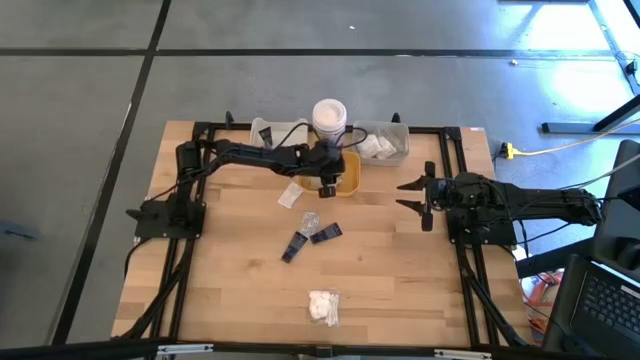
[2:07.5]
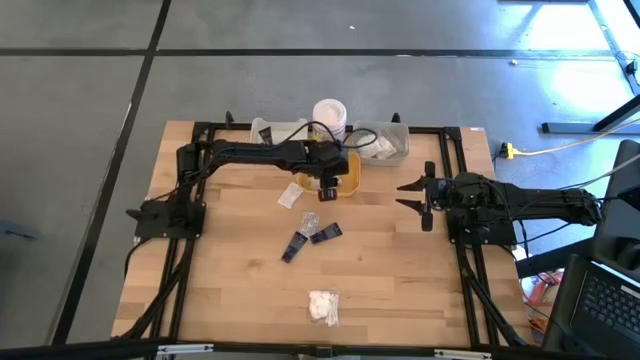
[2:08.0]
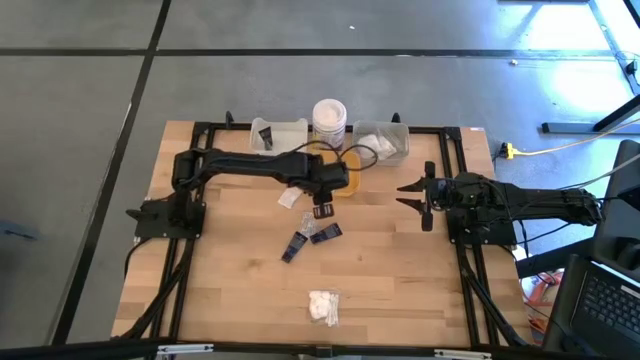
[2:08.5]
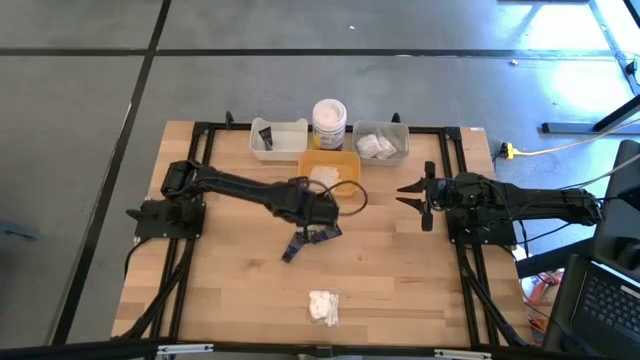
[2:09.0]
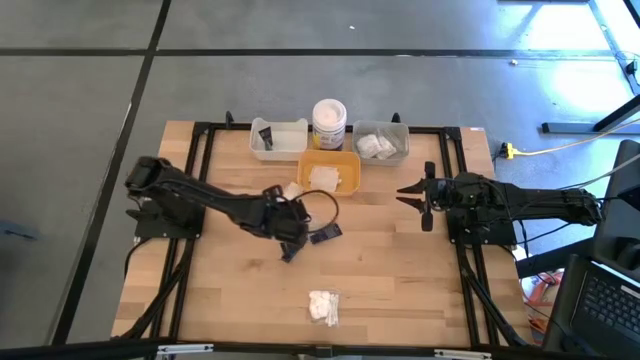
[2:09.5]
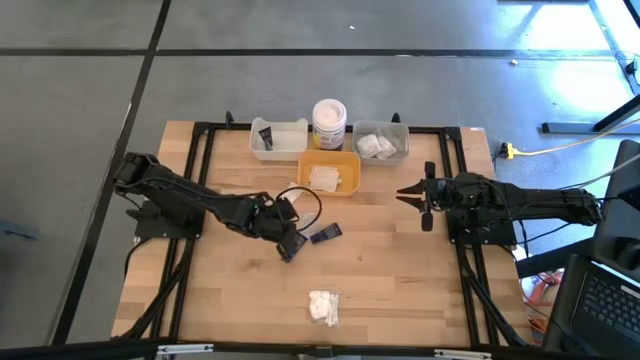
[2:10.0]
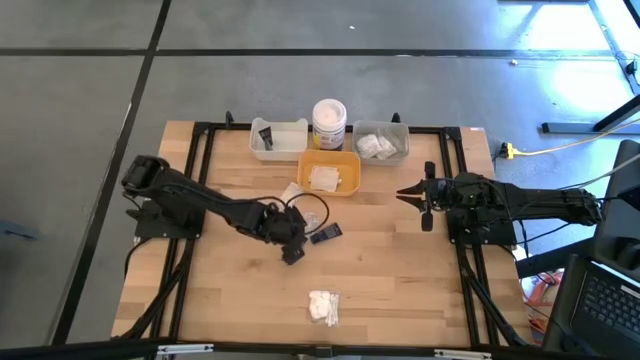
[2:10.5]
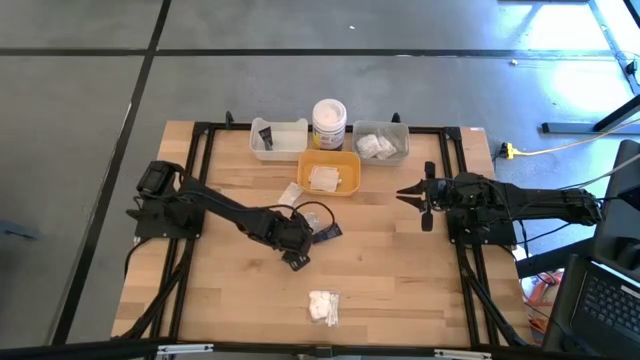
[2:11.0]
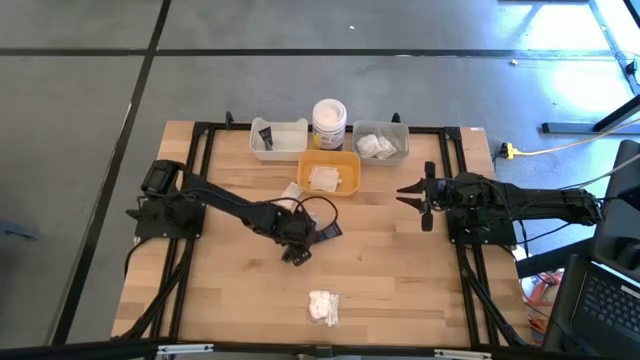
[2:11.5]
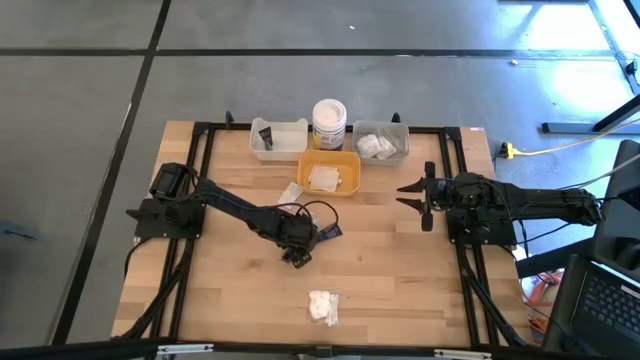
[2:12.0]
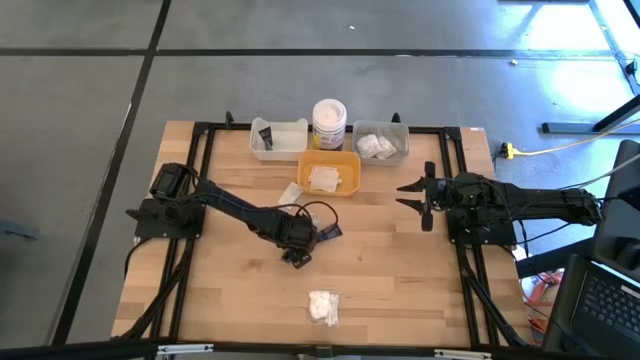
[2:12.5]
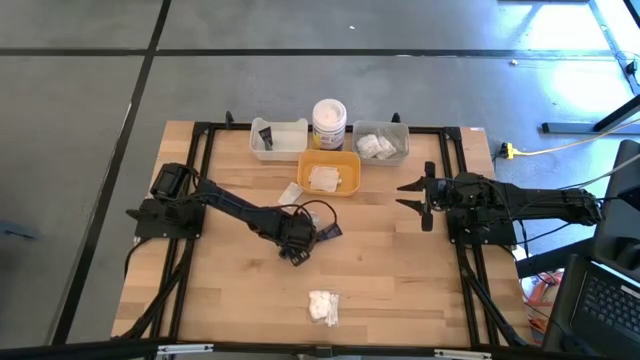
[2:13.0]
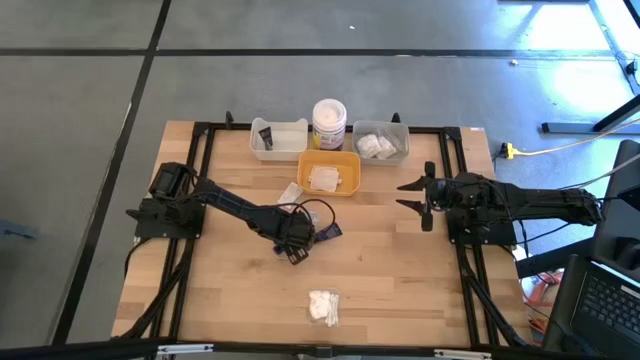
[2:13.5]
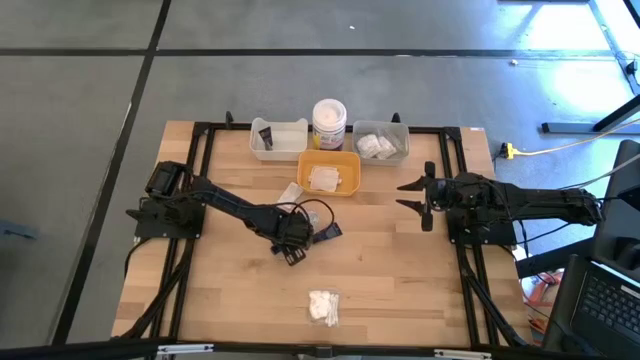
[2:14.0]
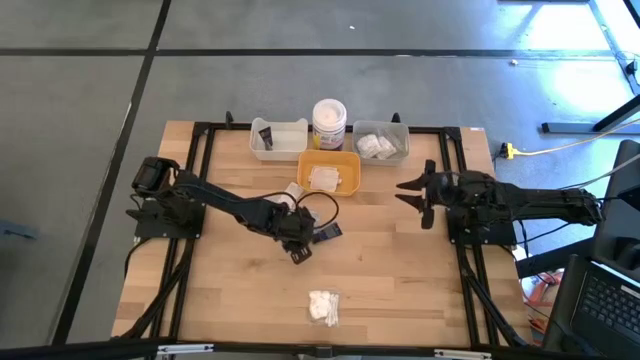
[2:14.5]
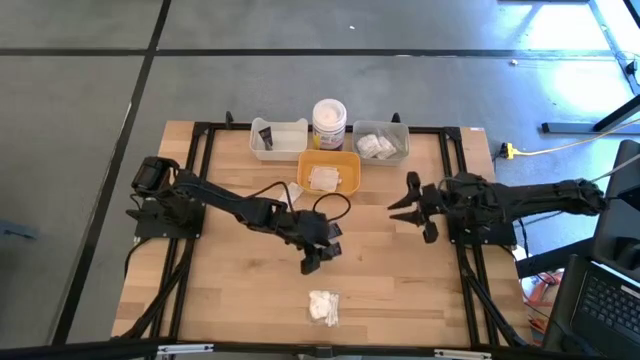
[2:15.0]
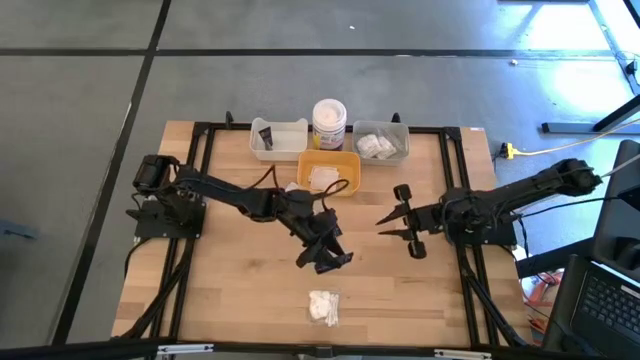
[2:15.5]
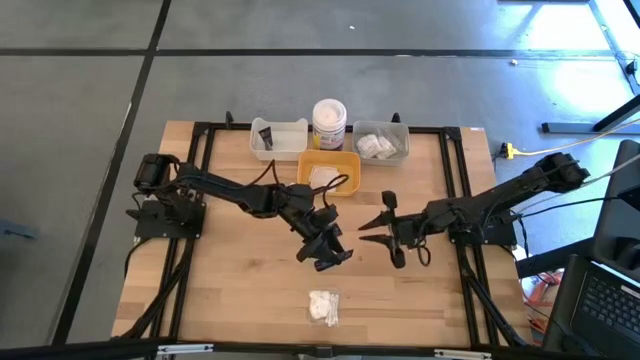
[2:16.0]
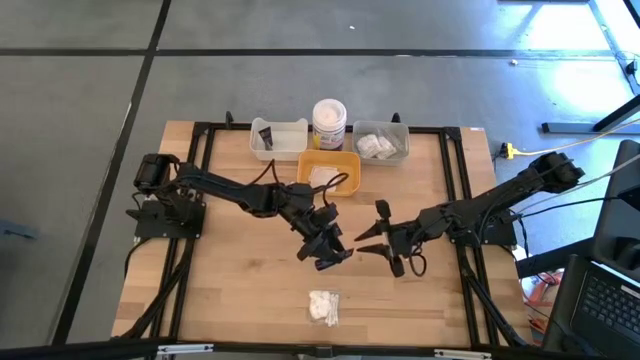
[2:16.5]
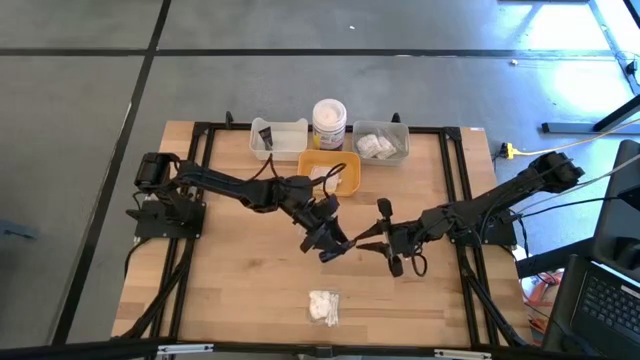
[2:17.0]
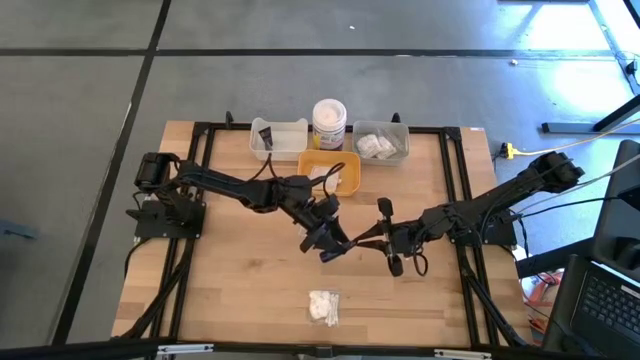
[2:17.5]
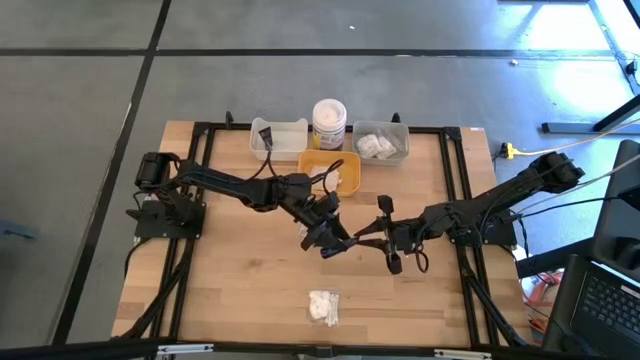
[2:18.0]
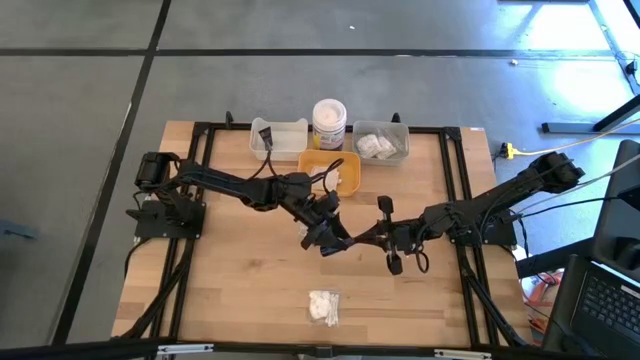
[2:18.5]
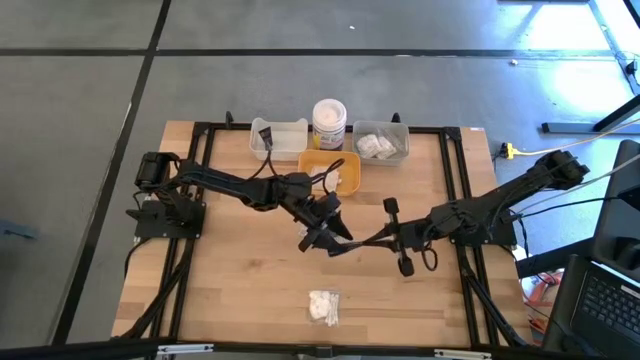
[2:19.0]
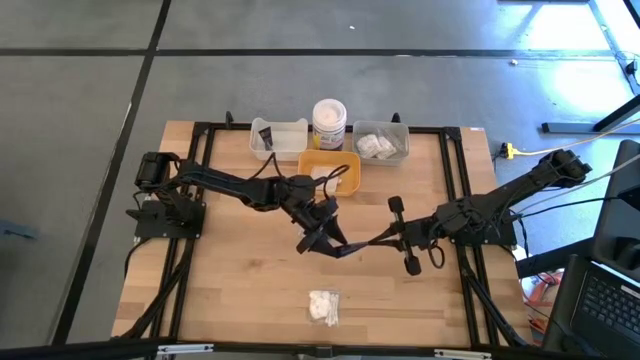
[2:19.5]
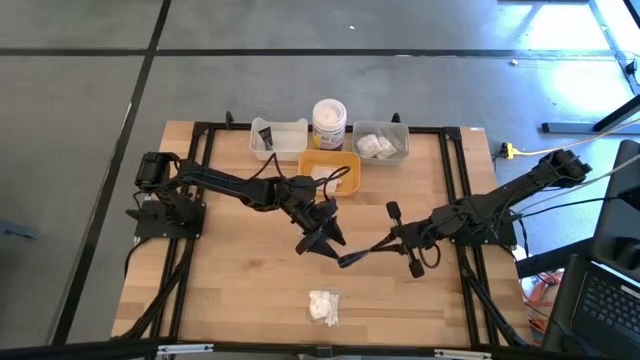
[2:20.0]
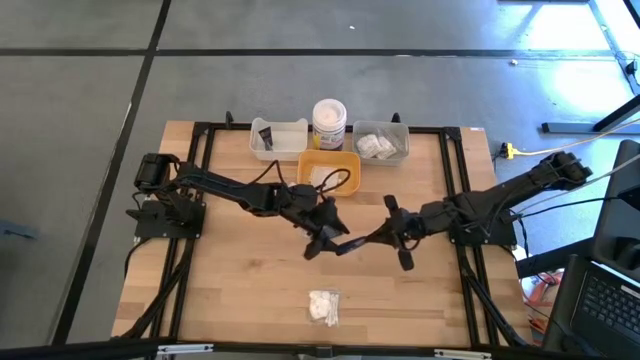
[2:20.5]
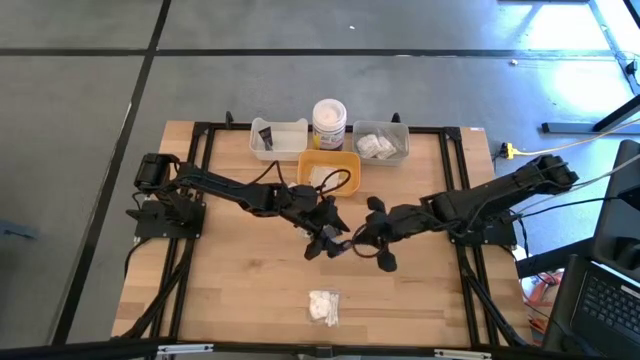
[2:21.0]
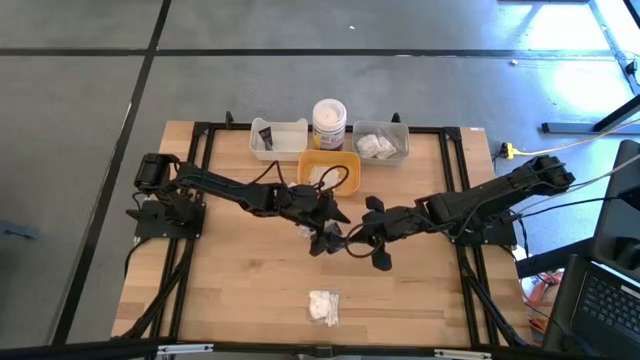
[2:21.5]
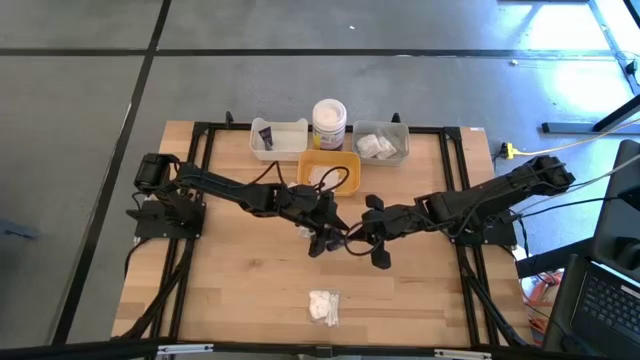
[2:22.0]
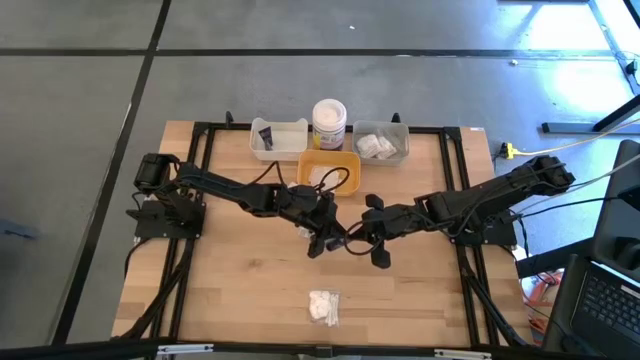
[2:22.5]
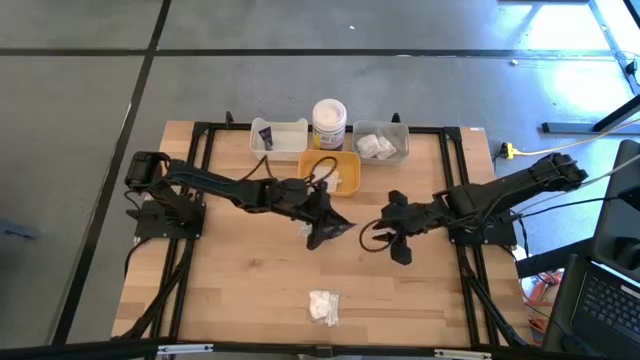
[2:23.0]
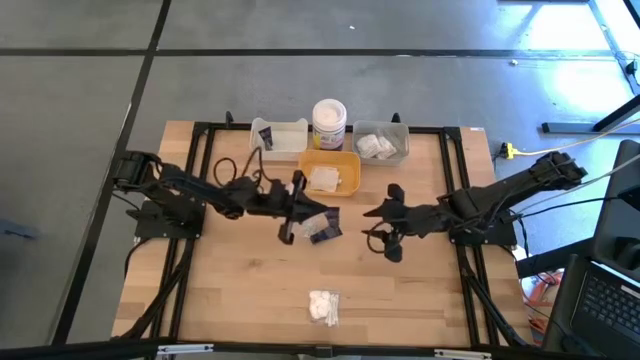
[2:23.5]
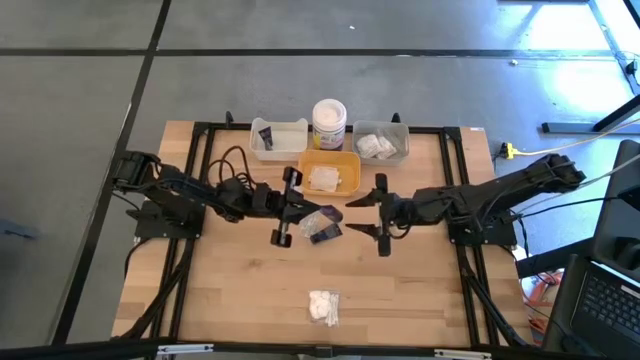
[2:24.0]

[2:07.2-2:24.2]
Task: Pick & Place Travel size toiletries
Put the blue shave cream into the white bin

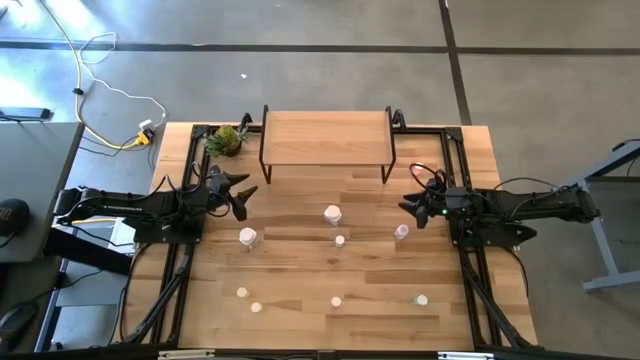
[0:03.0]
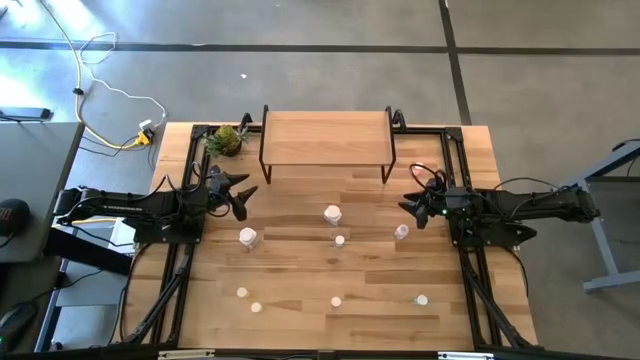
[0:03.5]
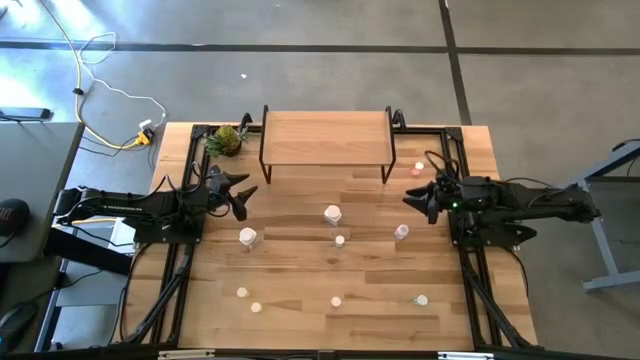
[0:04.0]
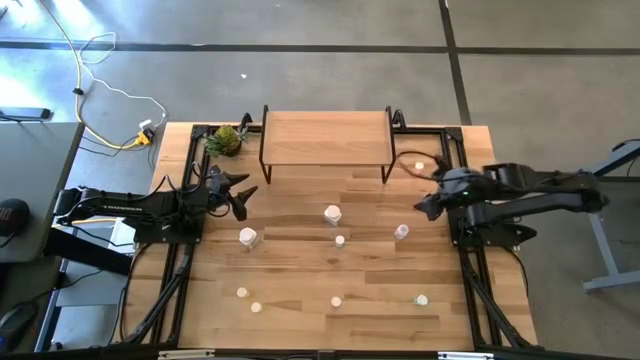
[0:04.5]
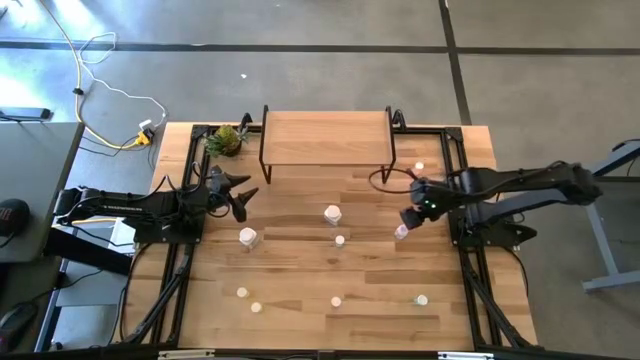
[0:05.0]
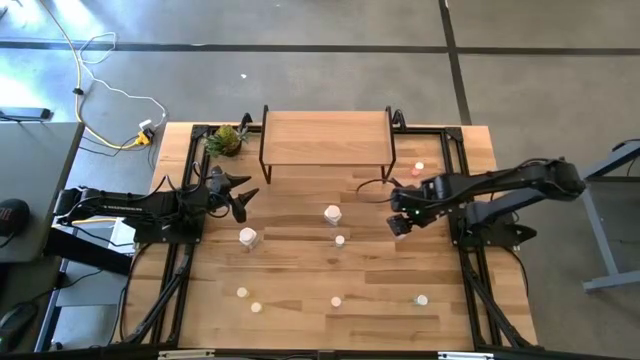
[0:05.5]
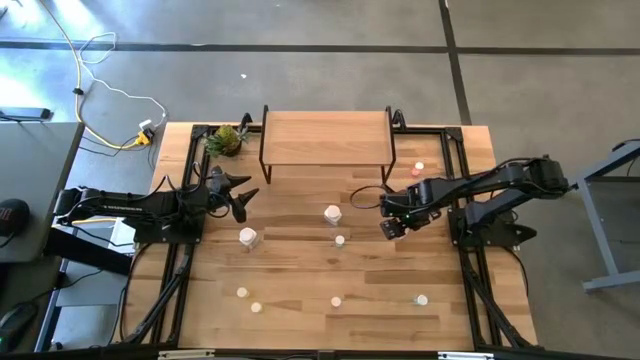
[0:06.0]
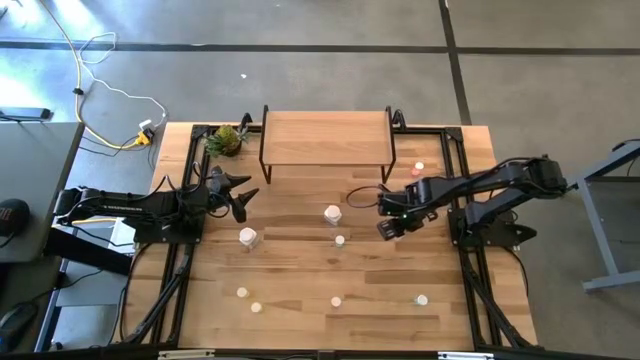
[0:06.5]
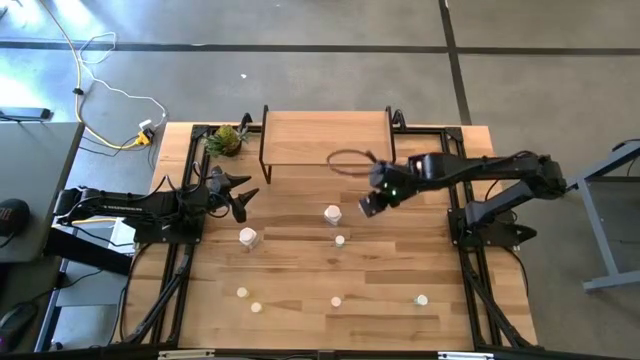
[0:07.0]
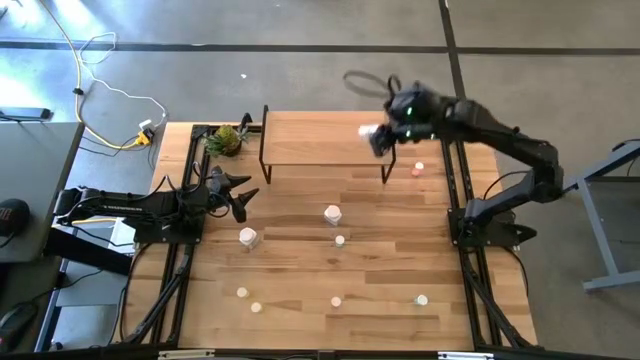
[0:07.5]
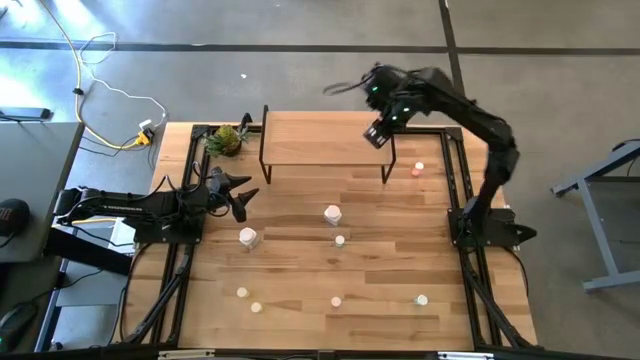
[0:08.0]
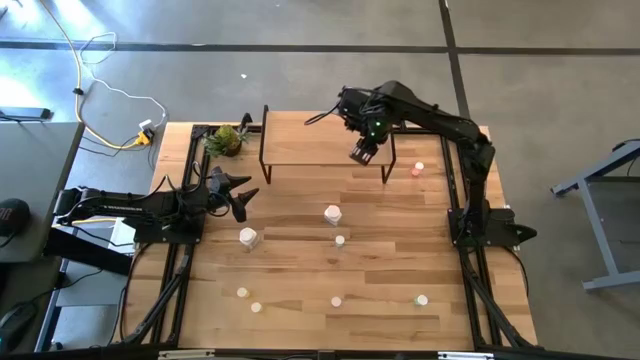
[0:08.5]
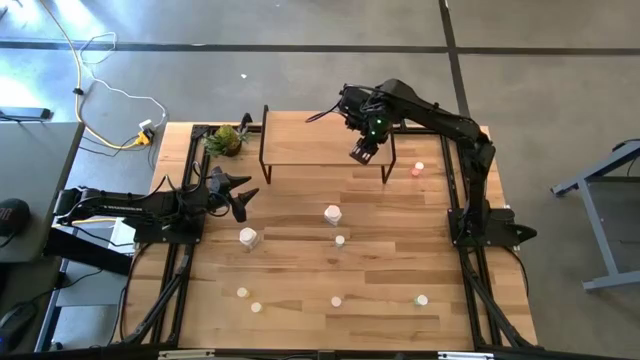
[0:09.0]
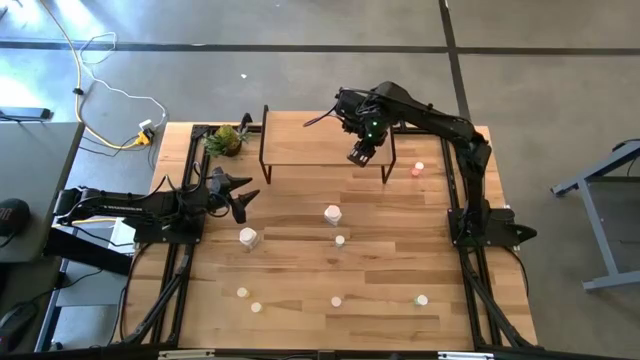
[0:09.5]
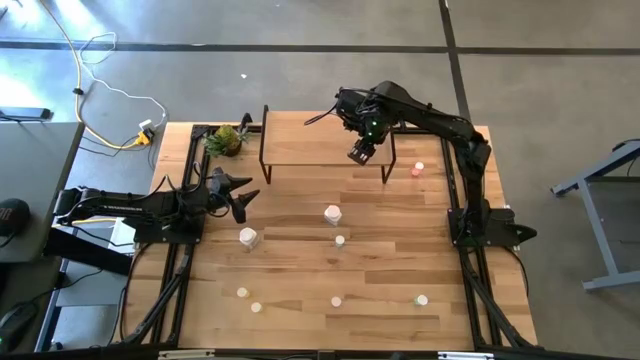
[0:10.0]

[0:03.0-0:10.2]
Task: Pick and place medicine bottles onto shelf by color
Put the transparent pill bottle on the shelf
